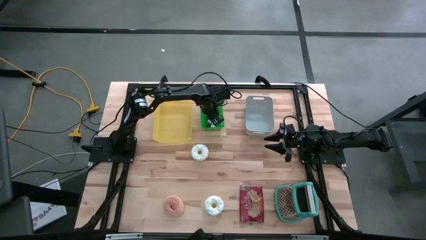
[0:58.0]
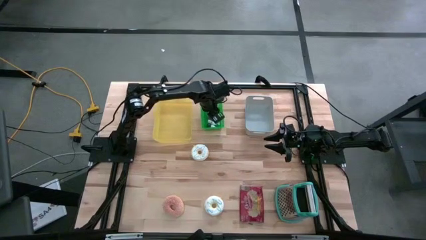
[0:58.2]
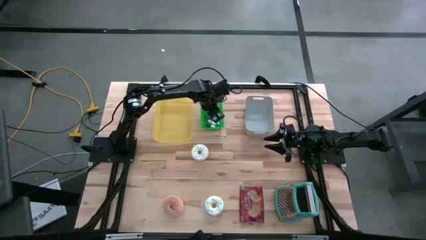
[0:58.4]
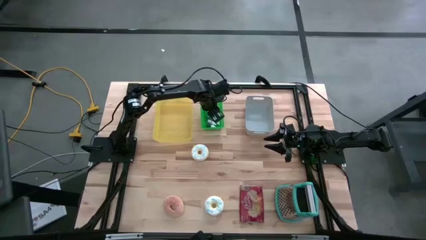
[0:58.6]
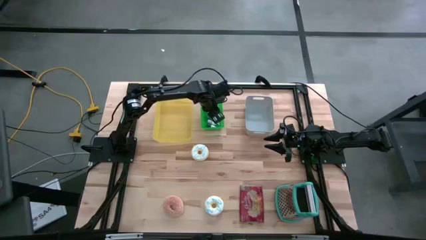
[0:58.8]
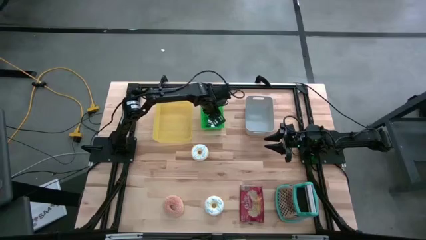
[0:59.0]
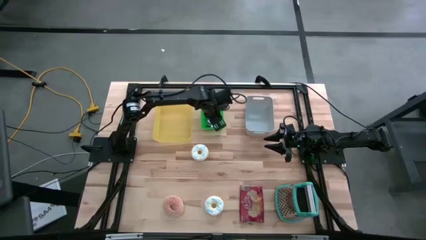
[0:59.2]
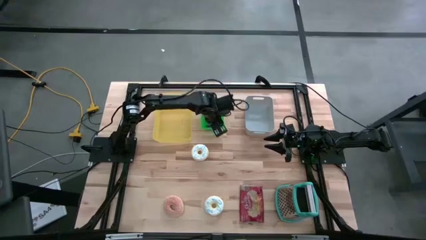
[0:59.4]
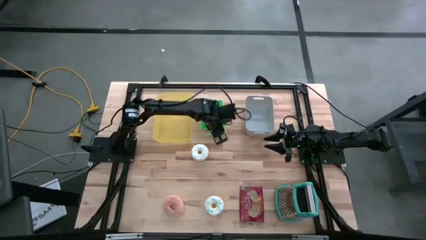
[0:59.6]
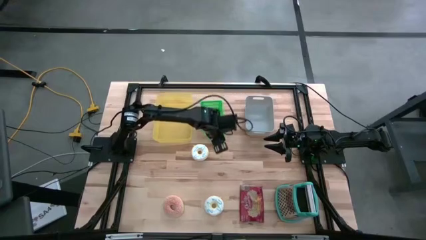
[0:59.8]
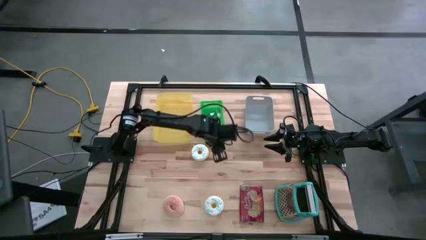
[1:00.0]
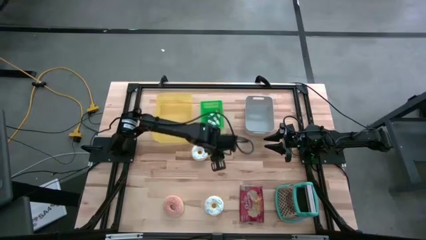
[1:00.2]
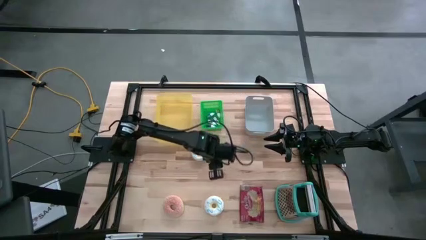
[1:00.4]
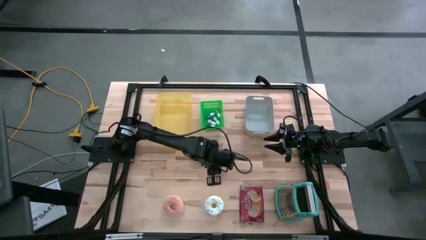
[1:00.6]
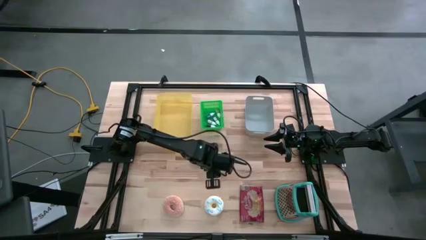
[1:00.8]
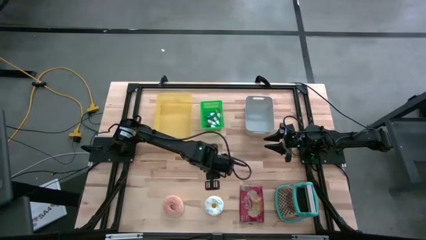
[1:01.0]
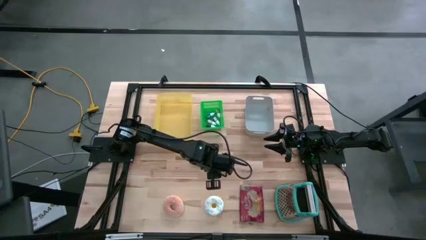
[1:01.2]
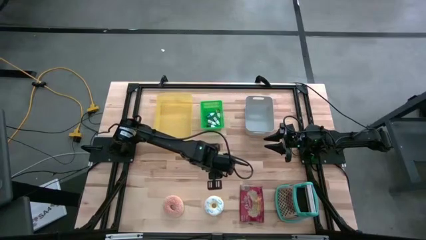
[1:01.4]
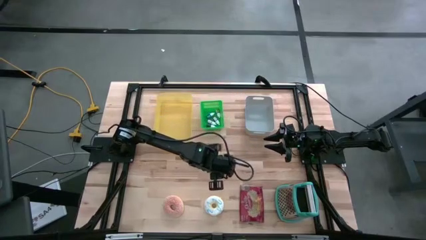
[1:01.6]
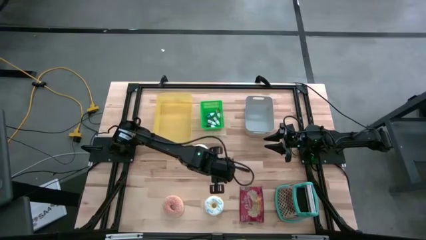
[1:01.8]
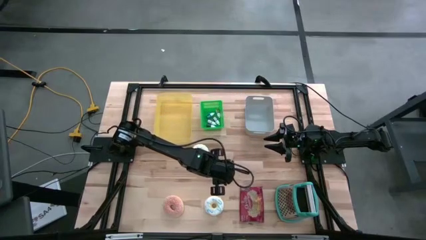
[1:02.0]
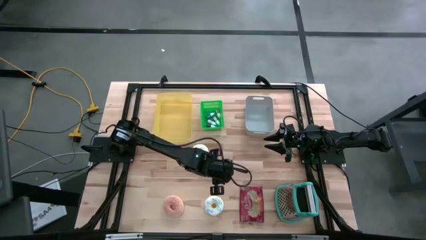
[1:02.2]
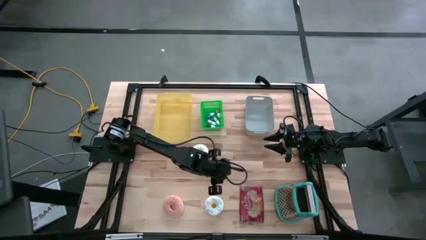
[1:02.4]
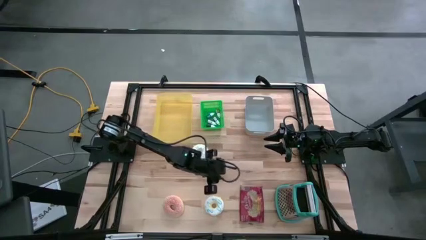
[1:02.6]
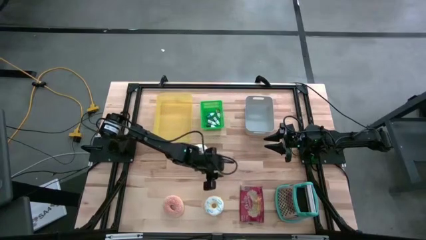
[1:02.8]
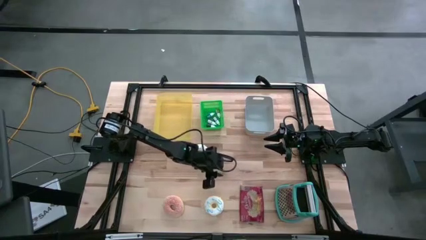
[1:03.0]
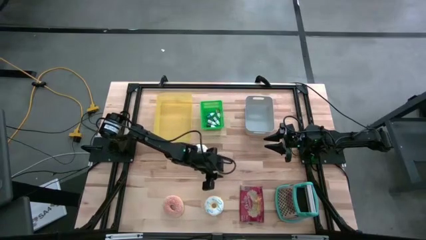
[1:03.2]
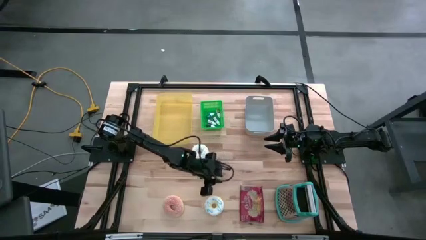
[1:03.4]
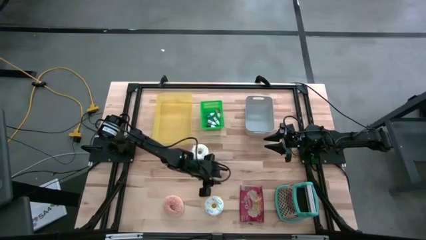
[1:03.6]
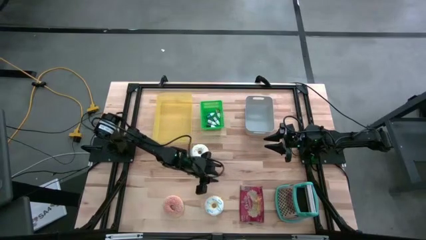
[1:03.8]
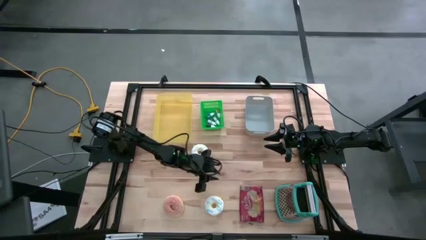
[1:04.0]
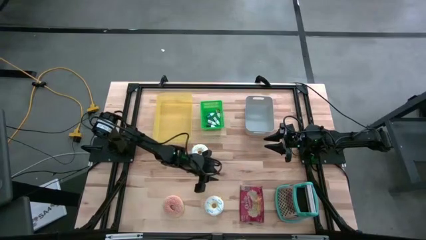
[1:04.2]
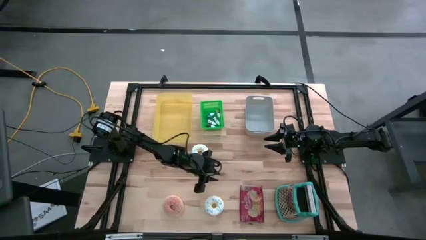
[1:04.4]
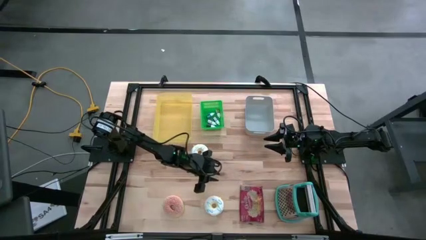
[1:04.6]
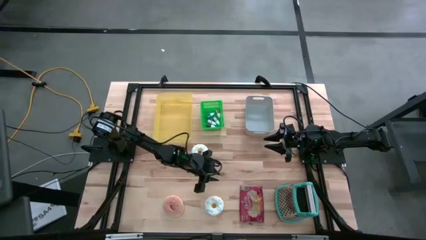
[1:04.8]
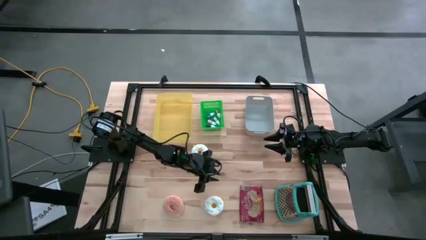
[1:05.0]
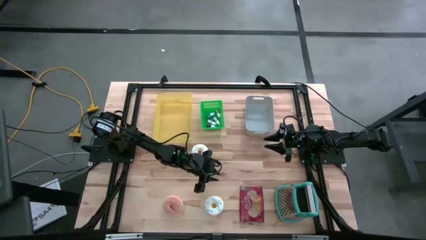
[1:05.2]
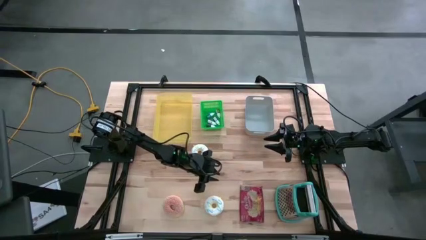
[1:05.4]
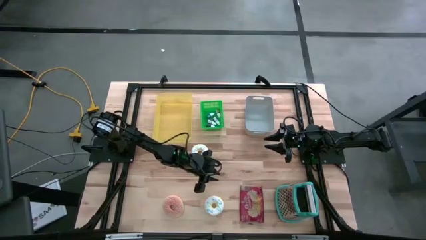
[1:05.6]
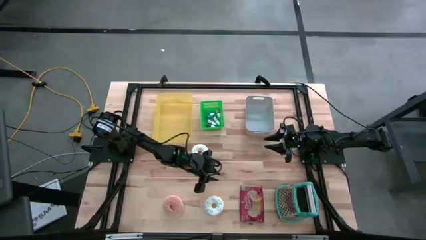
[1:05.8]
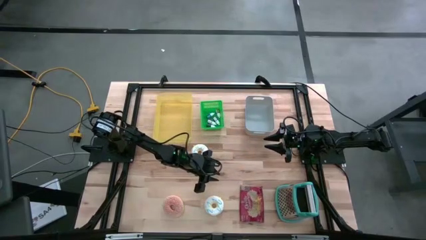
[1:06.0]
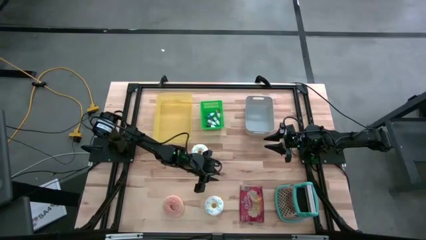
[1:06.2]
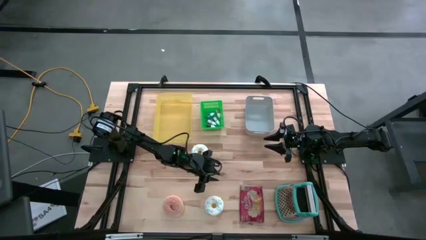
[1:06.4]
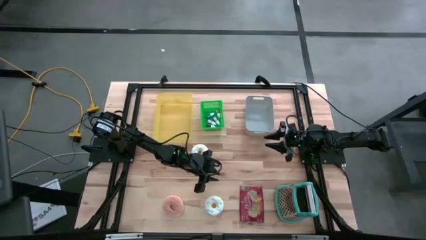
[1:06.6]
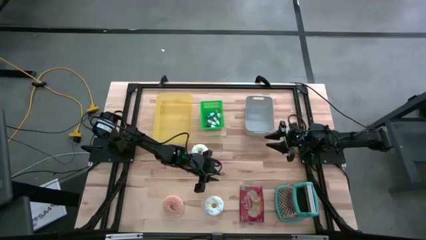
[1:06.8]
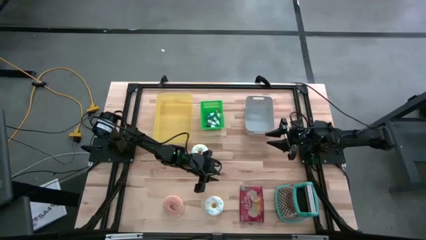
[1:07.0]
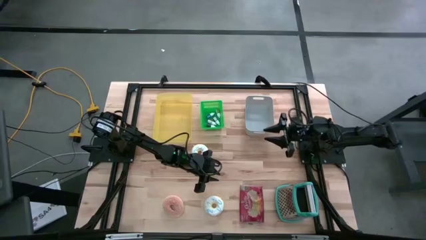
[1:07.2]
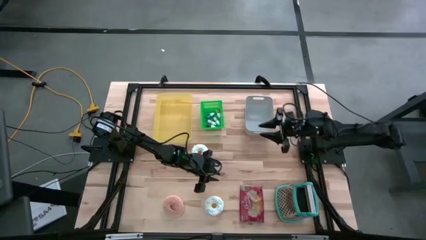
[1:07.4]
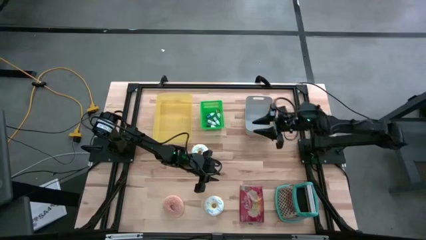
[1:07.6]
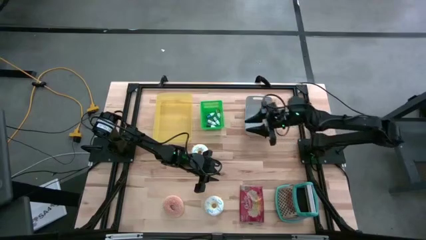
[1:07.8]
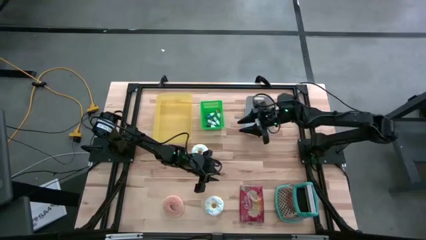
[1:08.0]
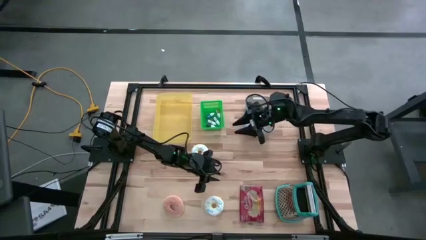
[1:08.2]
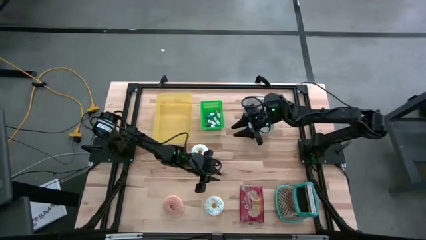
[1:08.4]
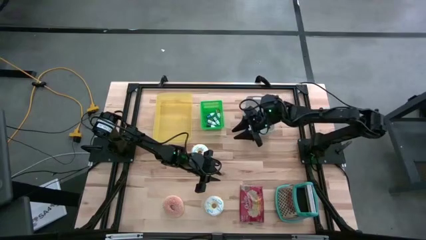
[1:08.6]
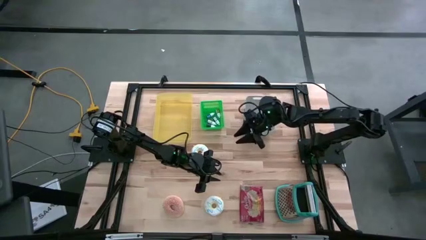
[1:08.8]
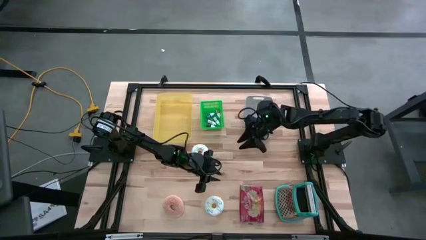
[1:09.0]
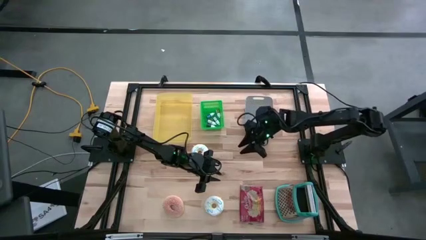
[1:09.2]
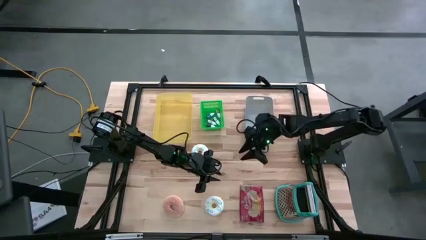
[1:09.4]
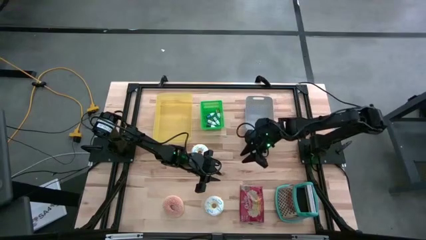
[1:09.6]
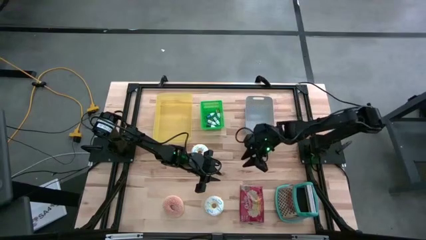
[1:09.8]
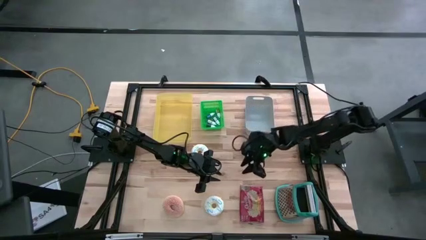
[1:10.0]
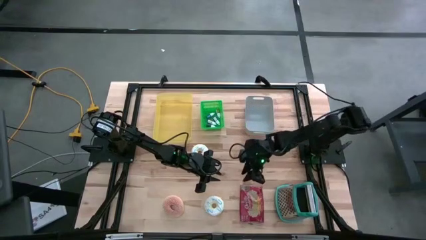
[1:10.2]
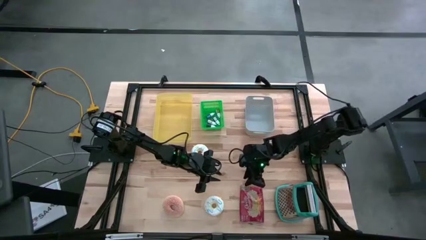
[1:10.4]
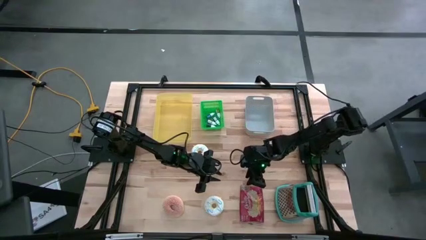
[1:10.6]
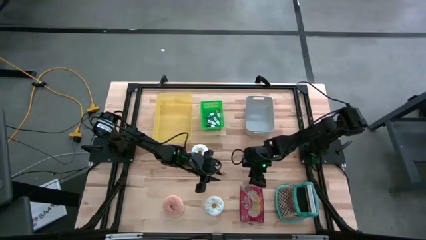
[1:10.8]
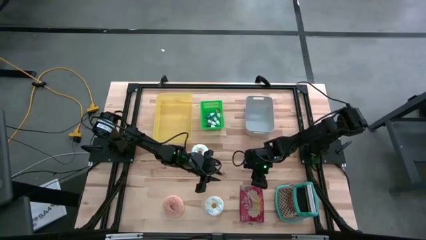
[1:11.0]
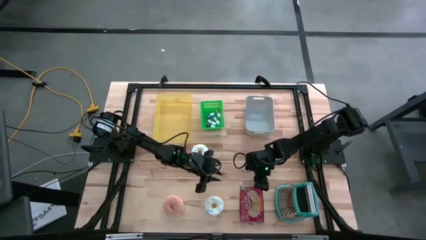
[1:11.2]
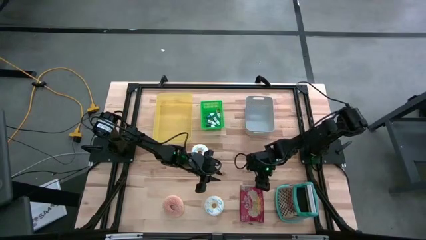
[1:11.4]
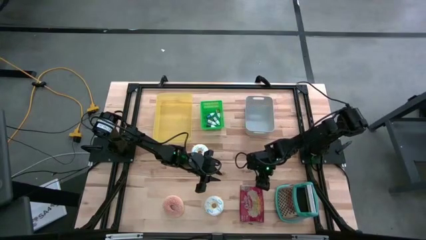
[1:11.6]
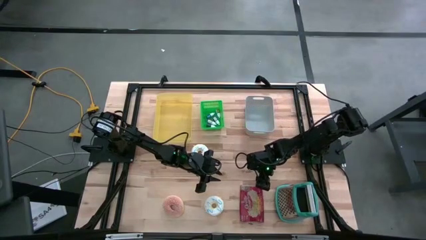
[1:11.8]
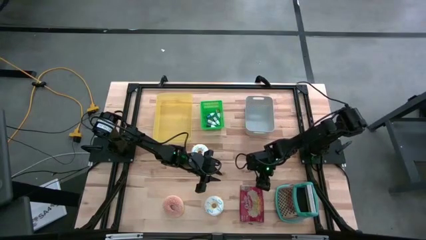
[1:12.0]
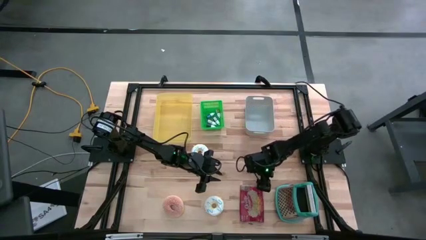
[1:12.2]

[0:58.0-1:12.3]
Put the popcorn bag into the yellow bin
